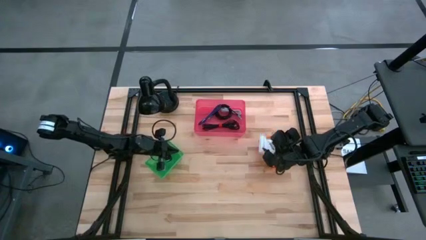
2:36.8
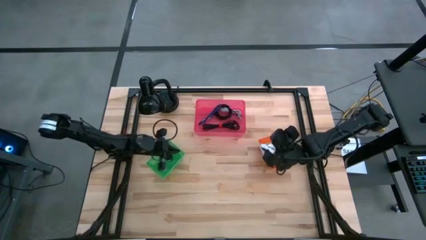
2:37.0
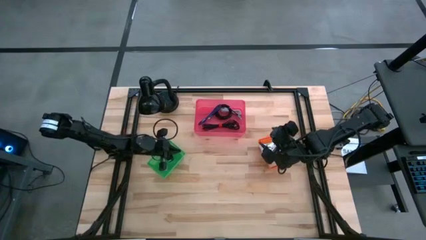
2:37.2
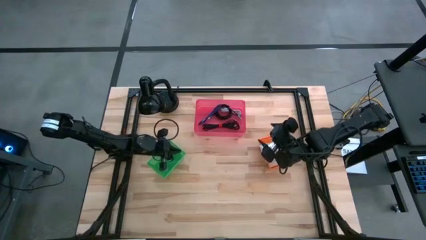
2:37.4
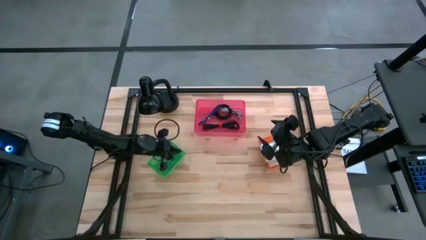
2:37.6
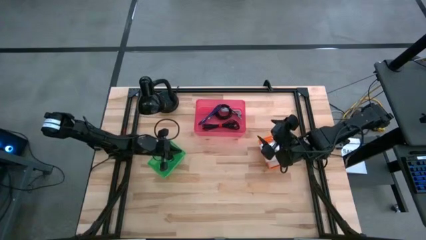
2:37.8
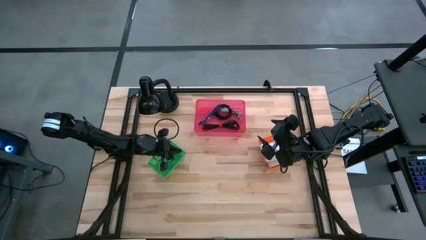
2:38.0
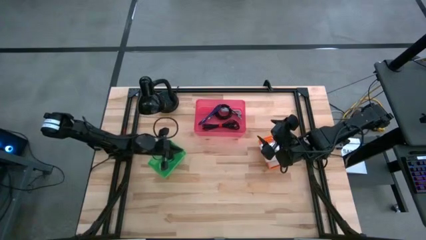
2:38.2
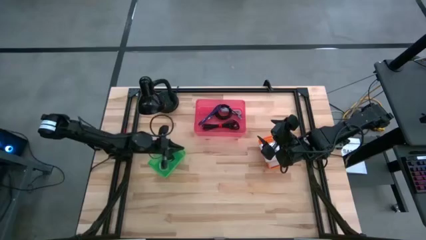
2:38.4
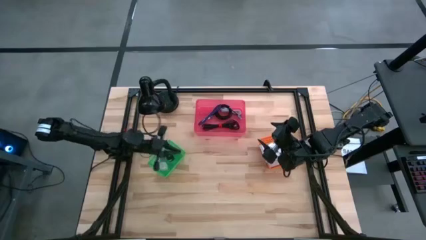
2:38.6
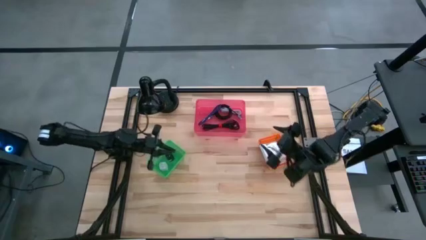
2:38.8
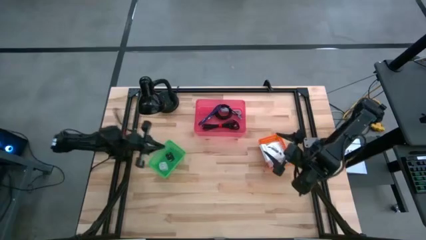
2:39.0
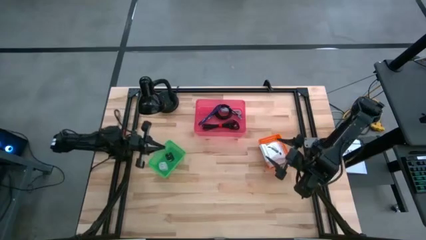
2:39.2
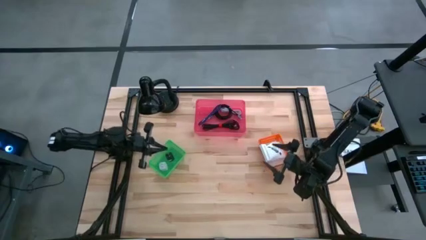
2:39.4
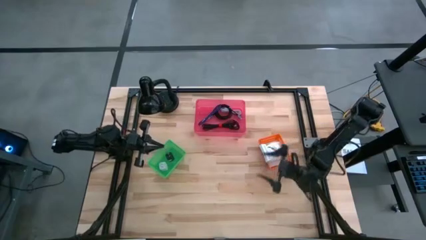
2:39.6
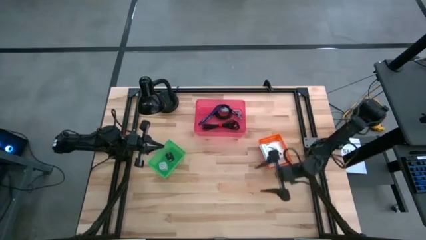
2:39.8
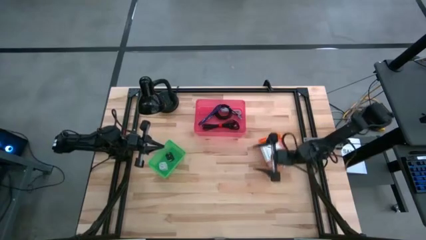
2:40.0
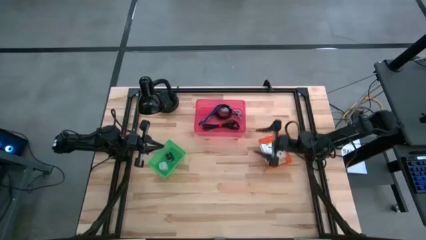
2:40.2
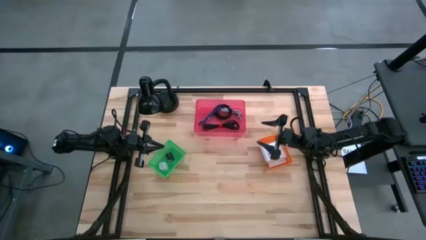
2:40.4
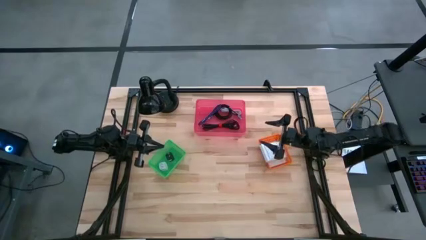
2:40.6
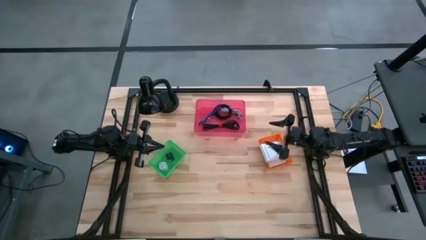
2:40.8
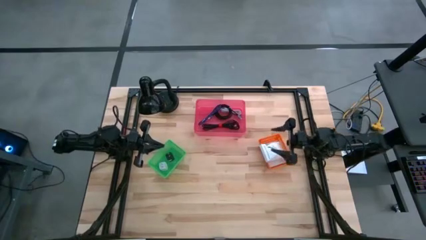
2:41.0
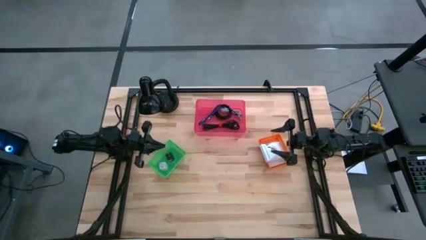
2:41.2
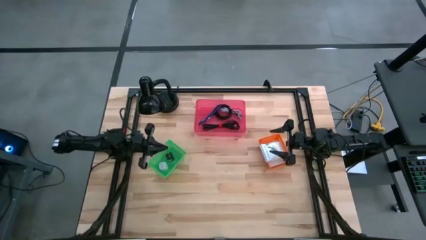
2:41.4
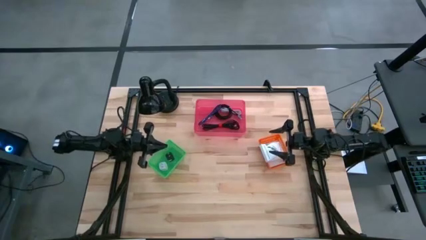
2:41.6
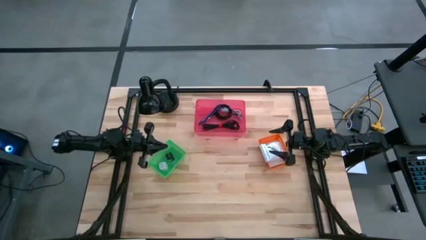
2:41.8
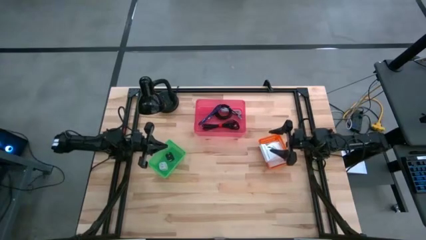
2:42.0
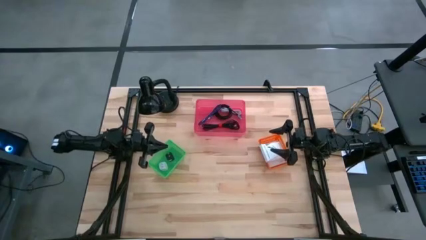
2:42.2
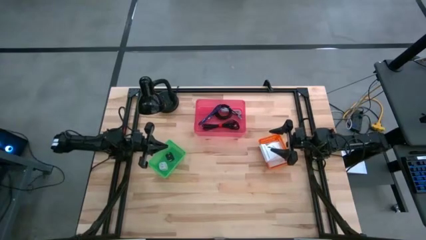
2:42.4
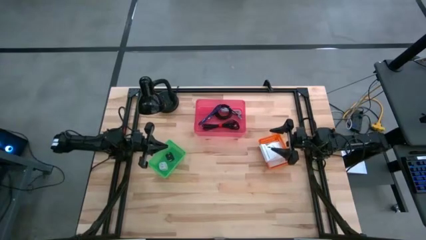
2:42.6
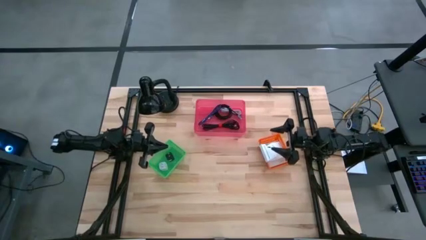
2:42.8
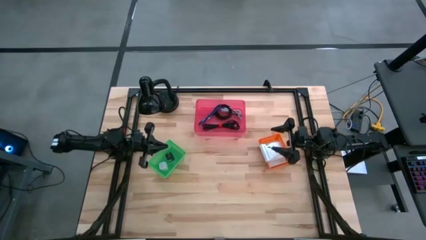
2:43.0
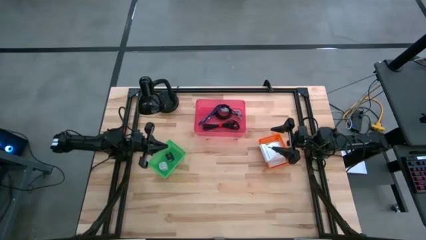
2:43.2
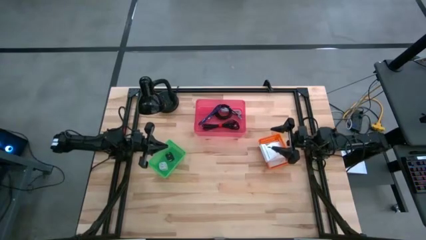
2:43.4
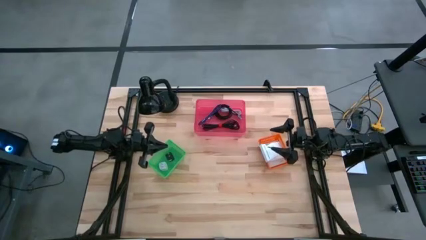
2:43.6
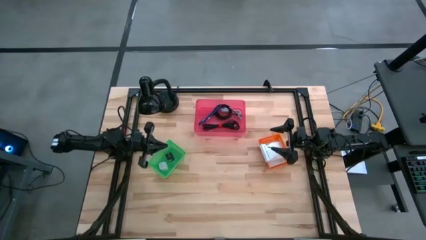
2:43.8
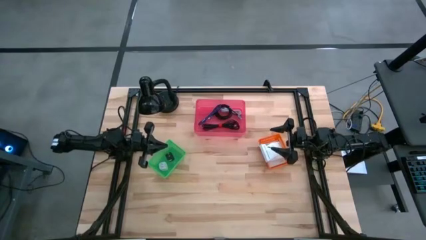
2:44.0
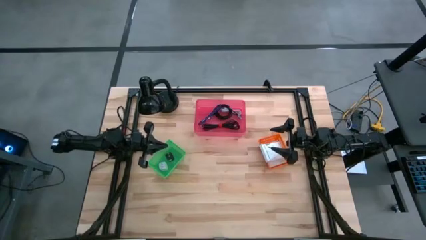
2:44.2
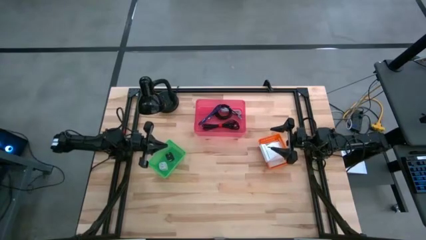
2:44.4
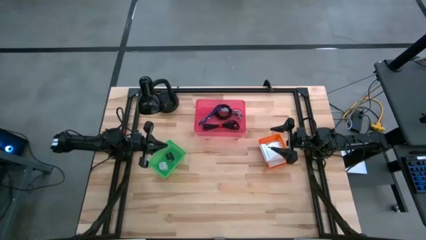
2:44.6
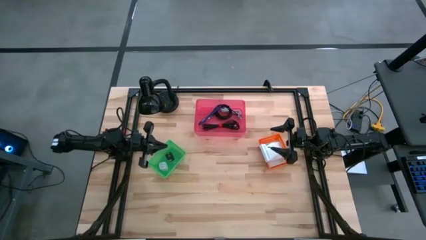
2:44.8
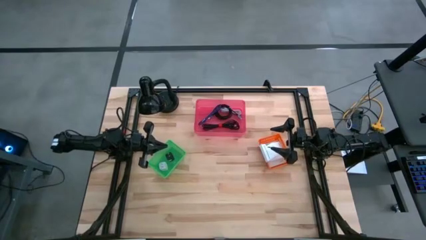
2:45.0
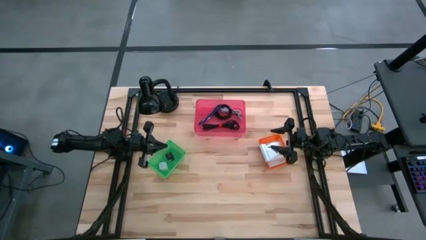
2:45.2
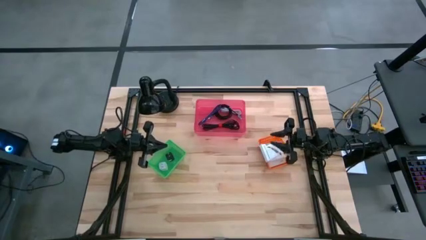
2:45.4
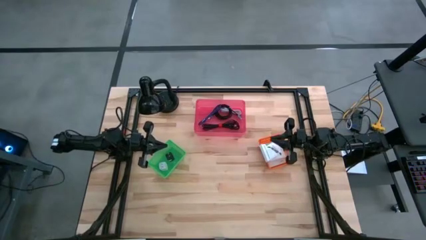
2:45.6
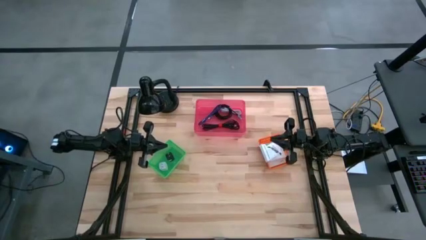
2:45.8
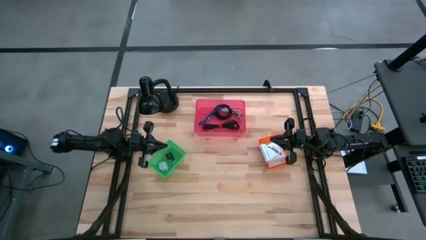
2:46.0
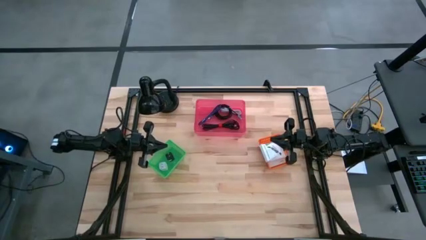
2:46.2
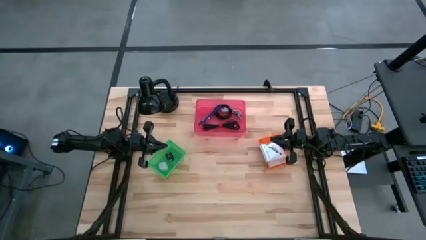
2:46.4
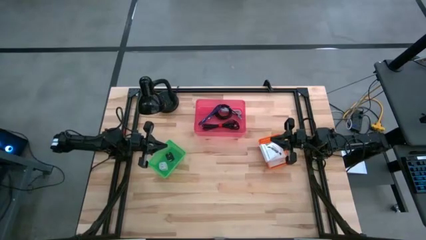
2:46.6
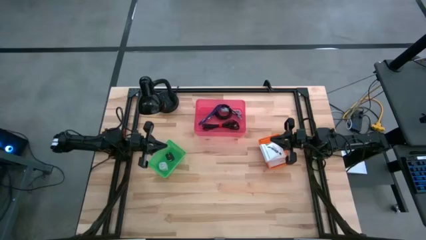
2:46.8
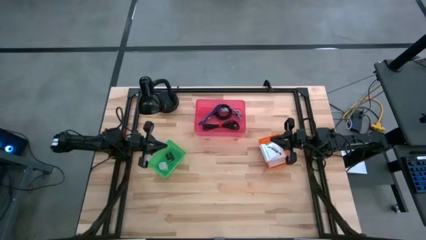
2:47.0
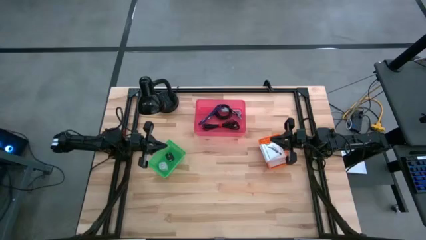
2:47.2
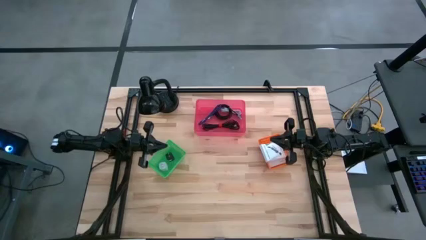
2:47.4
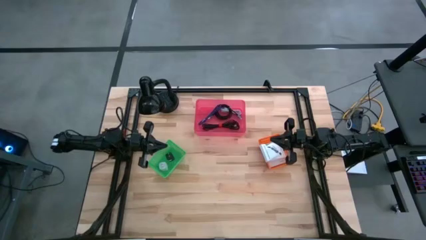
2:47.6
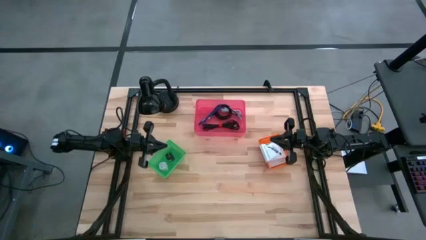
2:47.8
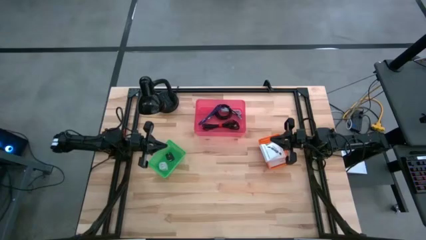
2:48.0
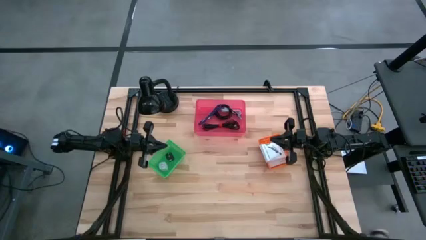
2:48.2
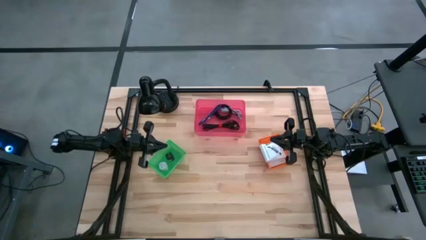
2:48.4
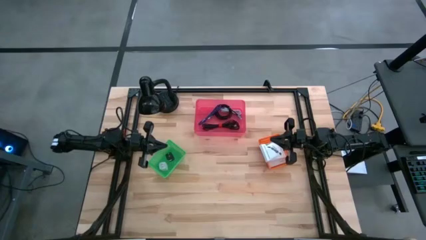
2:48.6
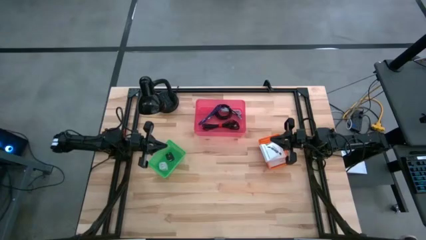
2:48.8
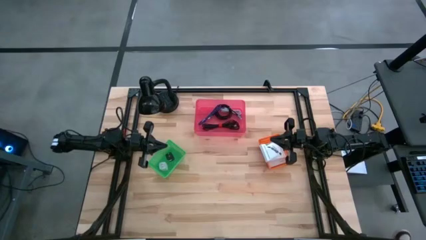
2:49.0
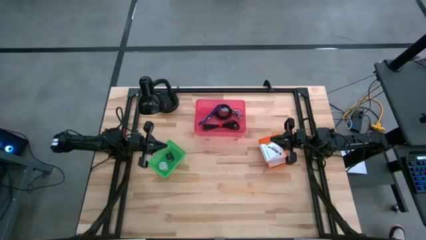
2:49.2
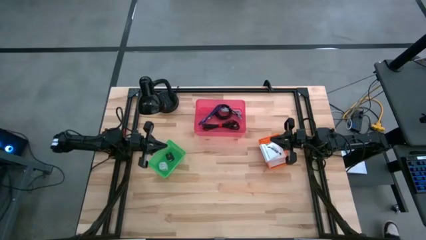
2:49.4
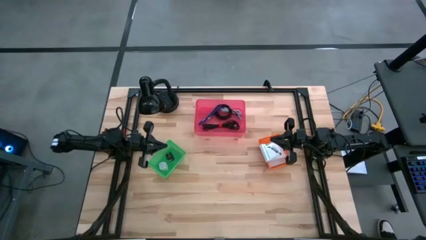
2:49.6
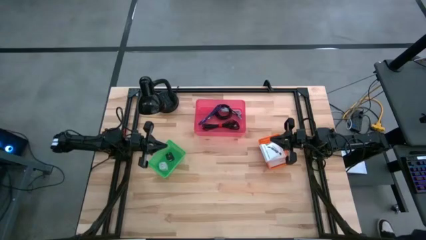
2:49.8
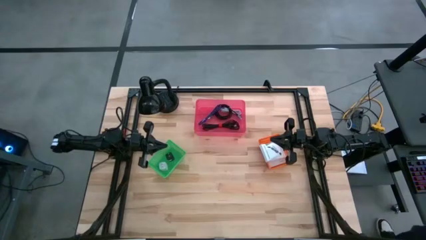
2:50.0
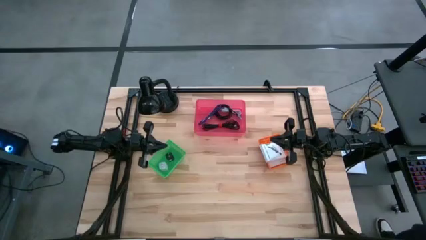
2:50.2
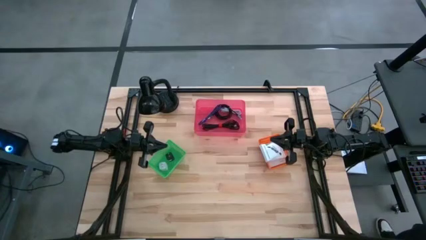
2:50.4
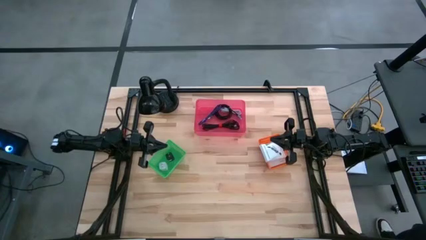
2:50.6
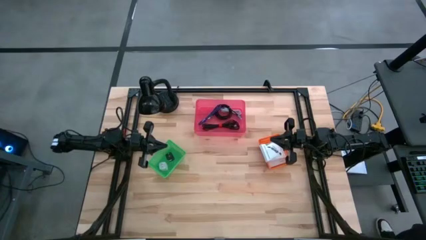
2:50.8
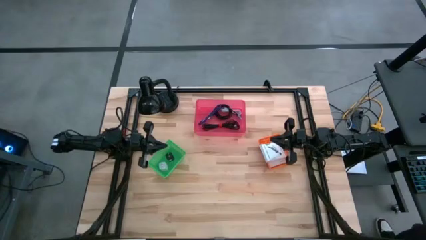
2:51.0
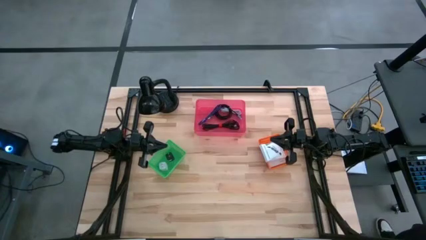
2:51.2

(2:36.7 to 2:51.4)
Task: Pick and place items into bin
Return to Home Position
